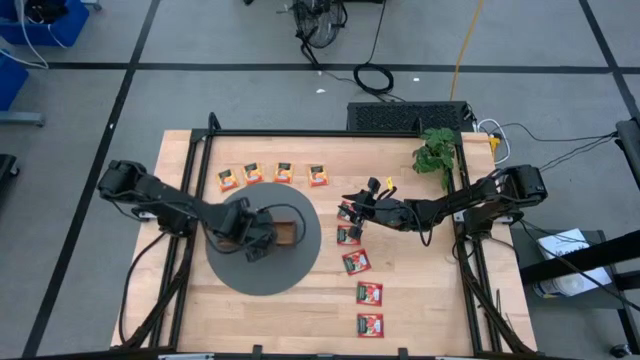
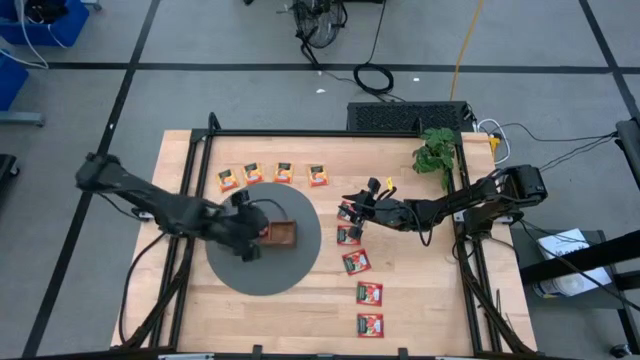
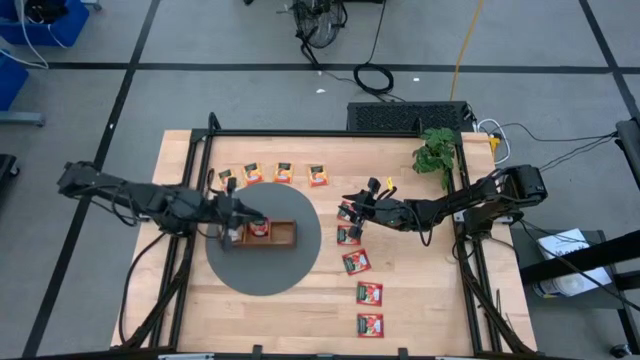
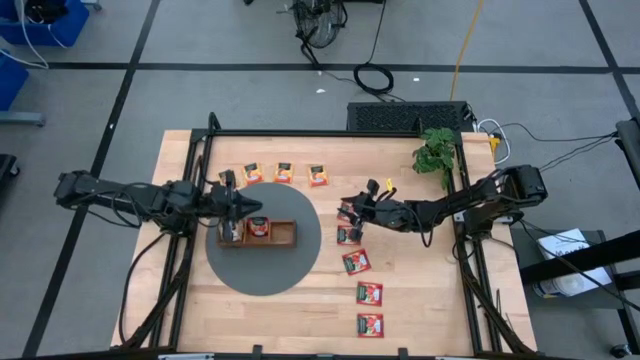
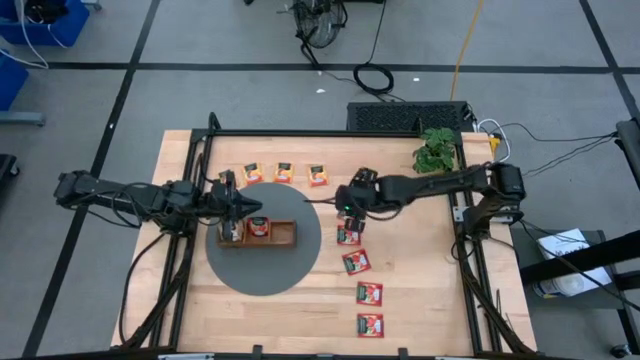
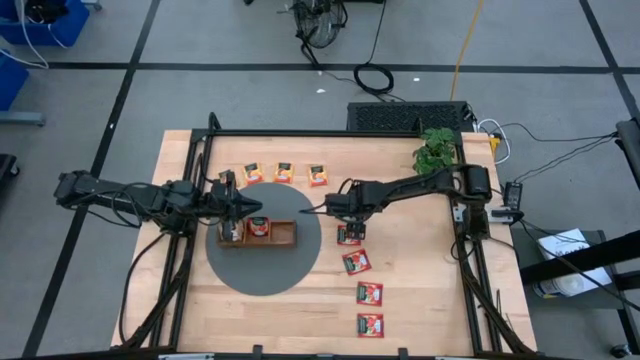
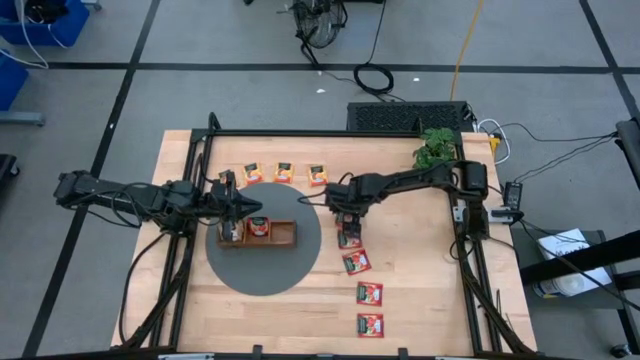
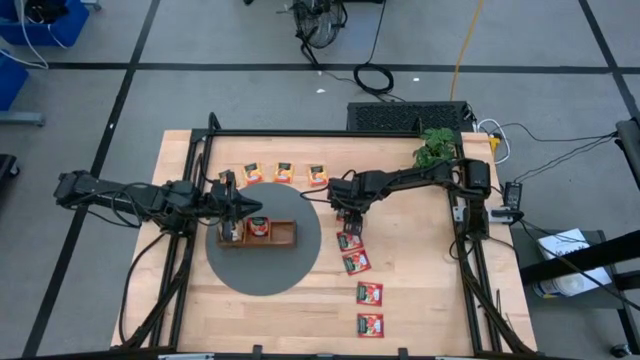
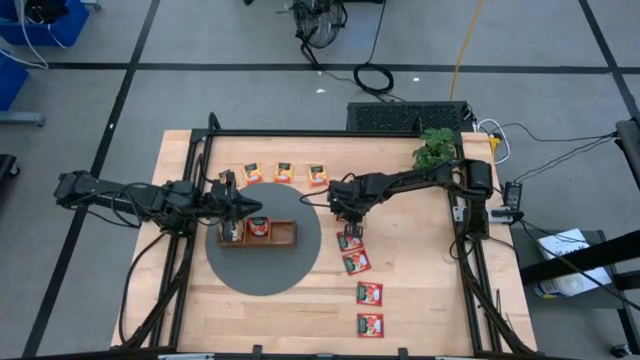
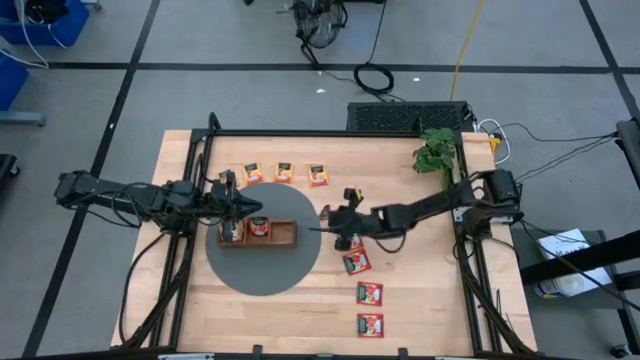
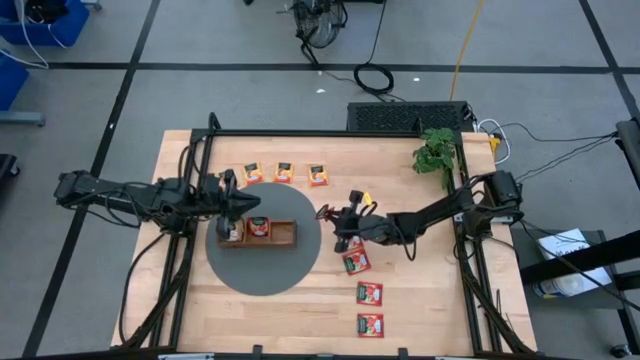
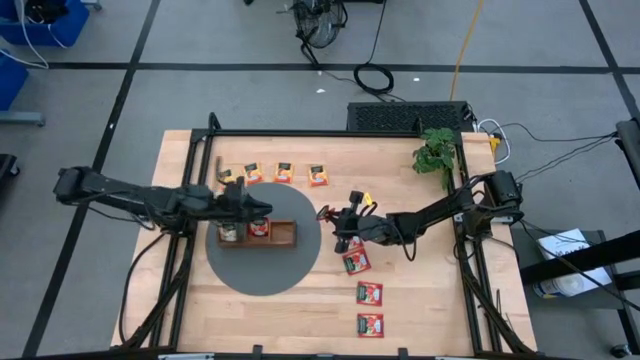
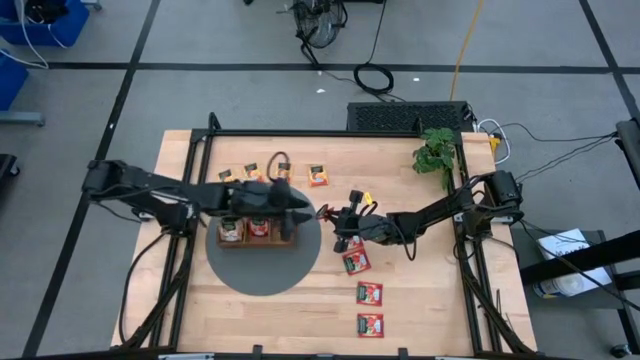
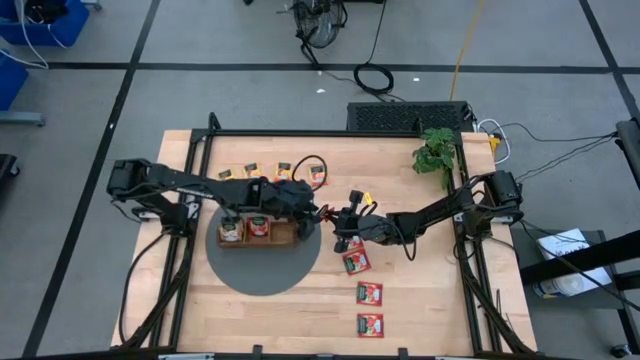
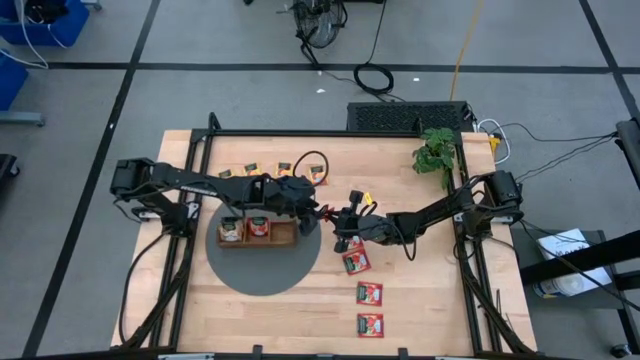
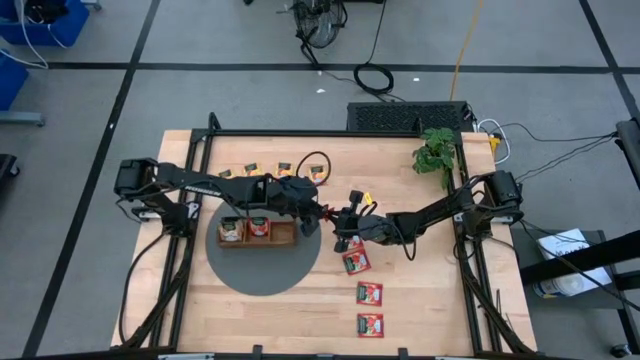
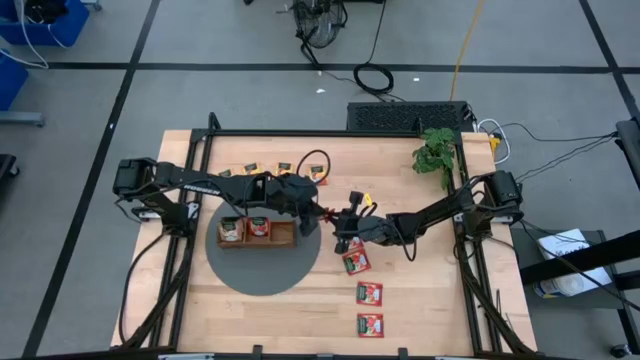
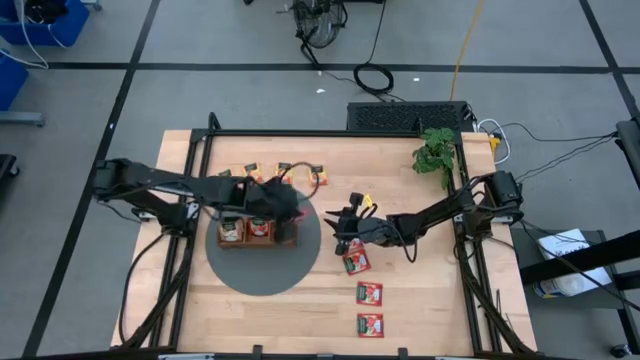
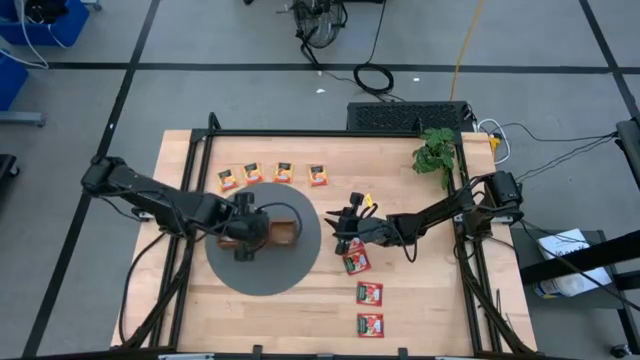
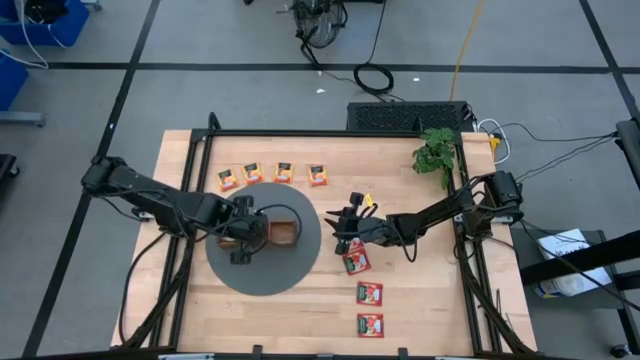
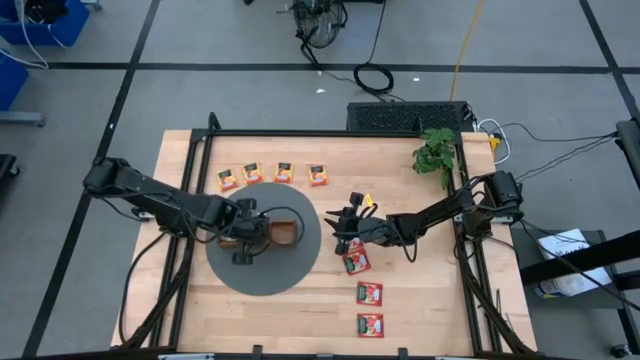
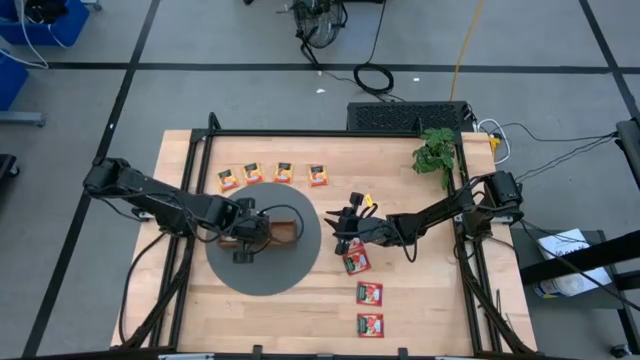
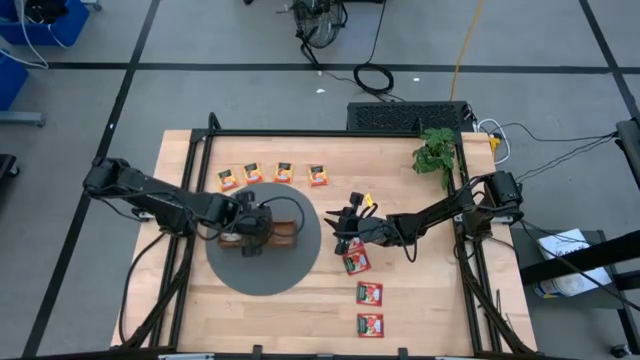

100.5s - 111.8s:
Task: Pick & Place Tea
Put the red tea bag into the middle section of the wooden organizer

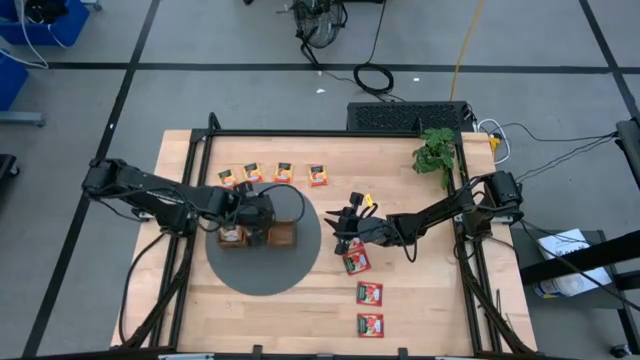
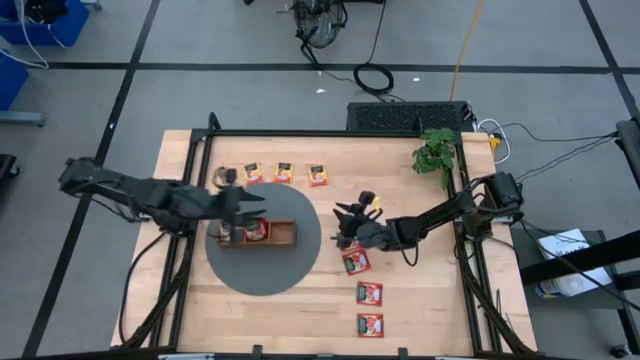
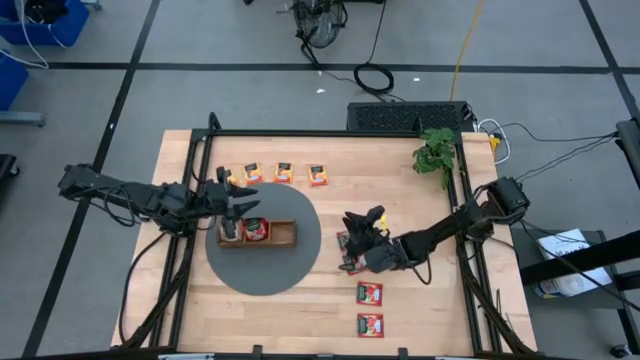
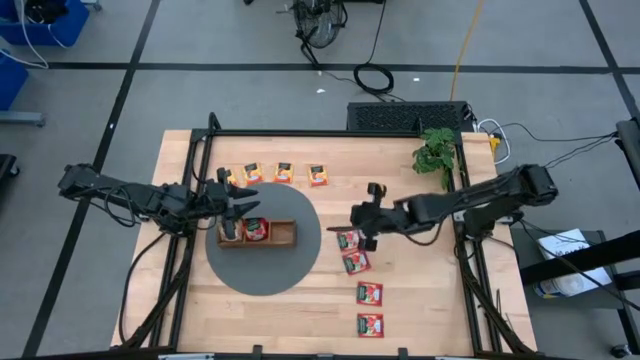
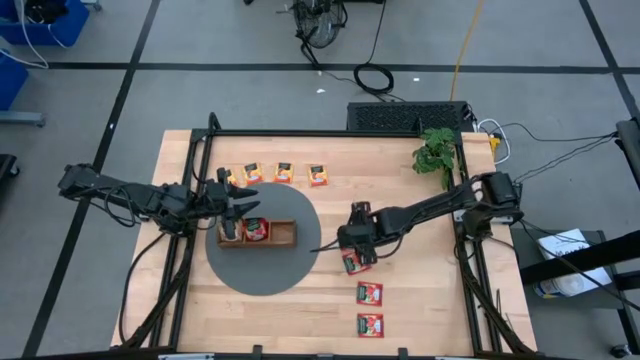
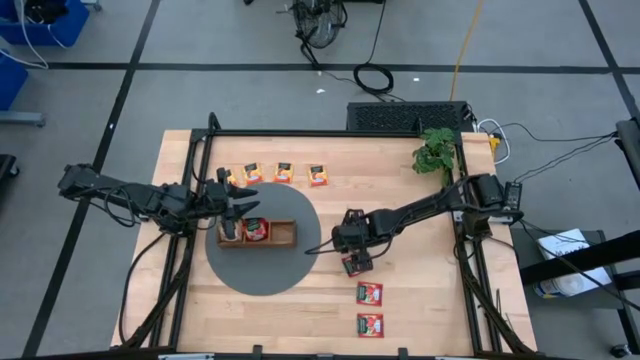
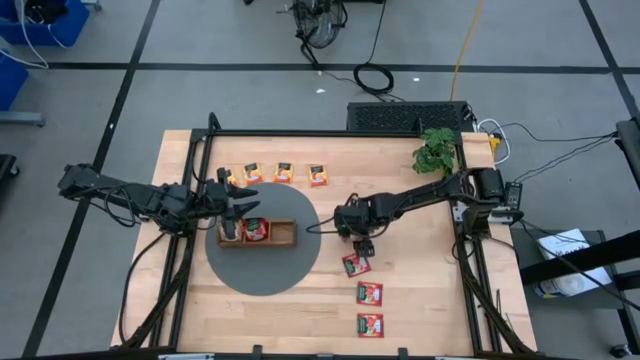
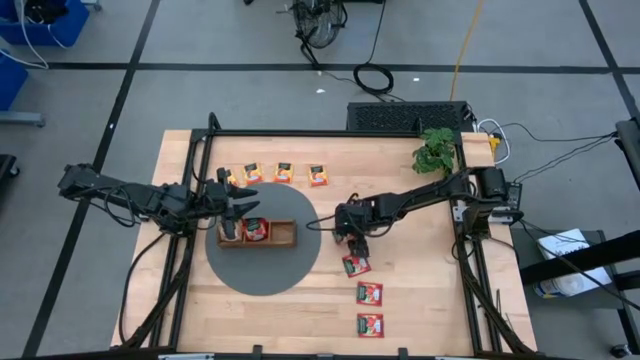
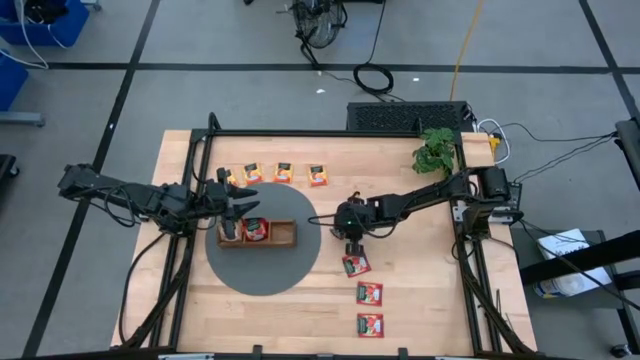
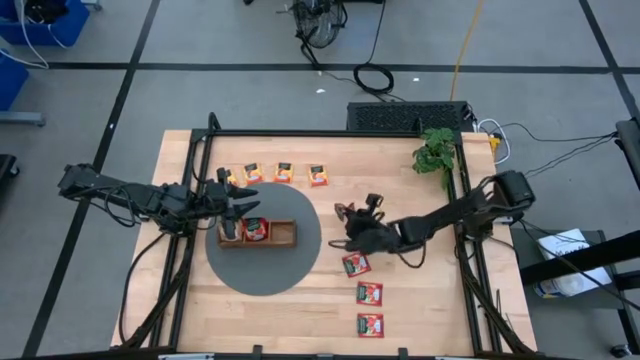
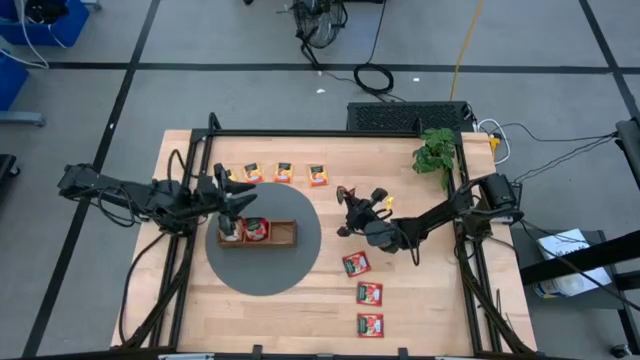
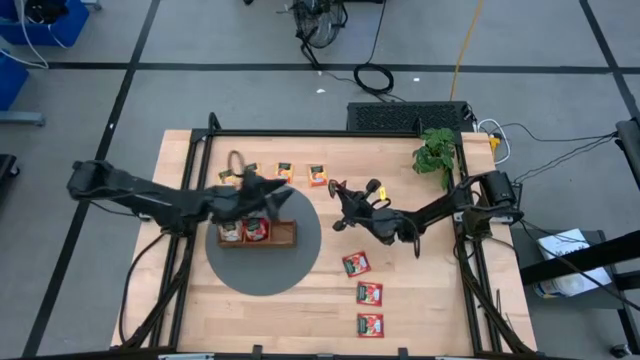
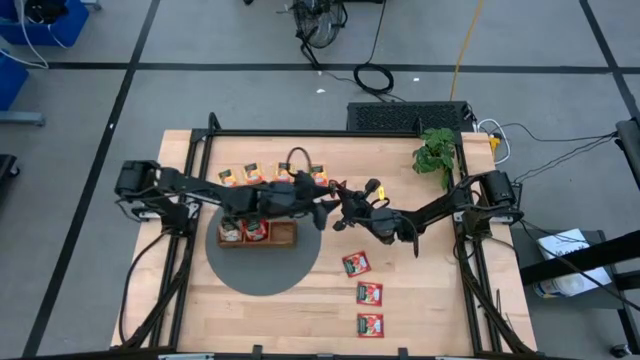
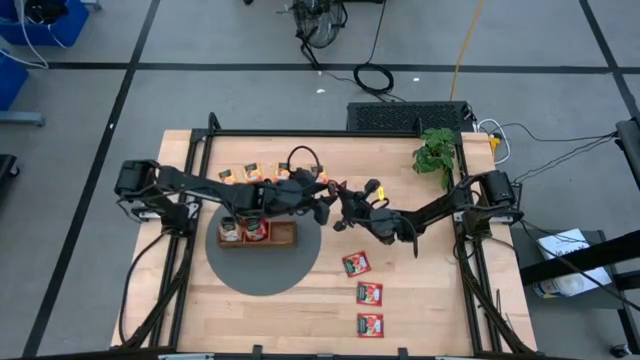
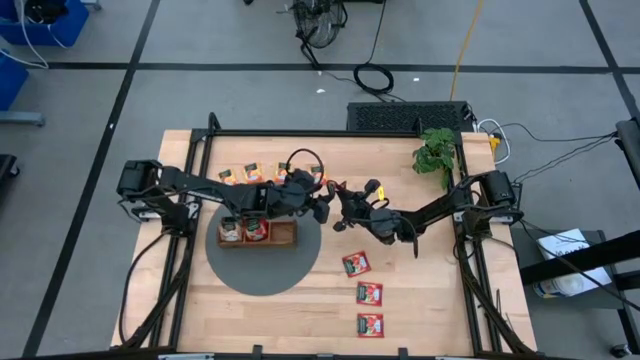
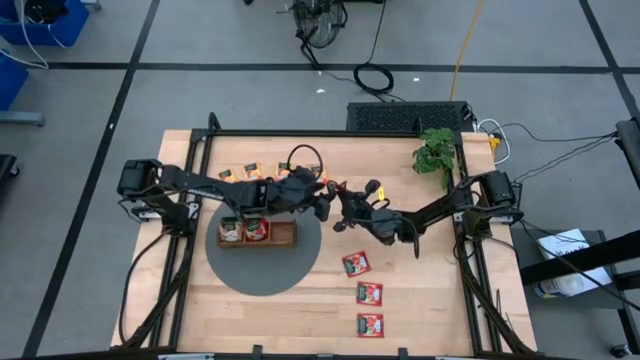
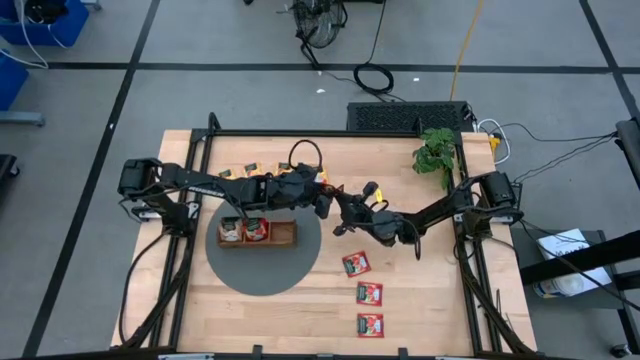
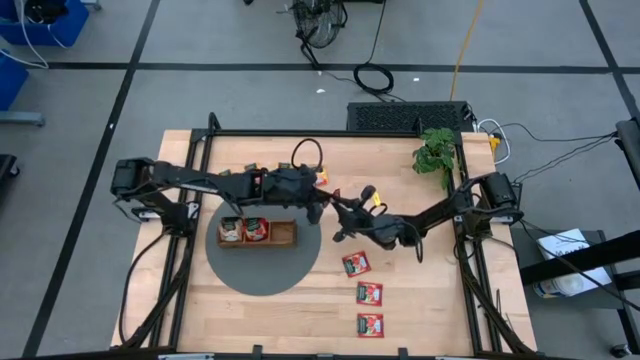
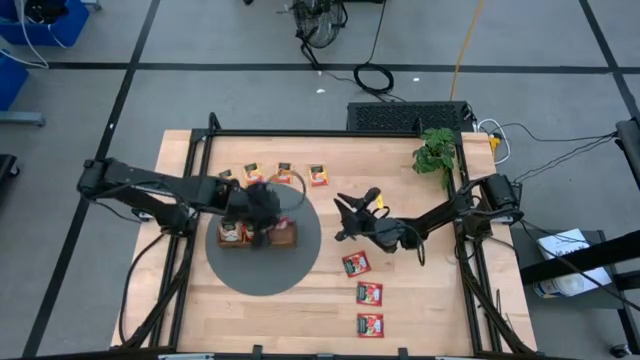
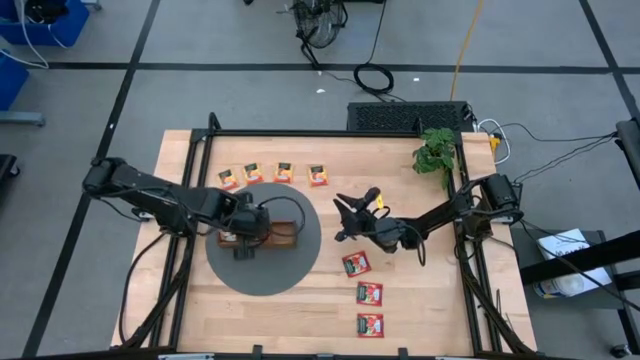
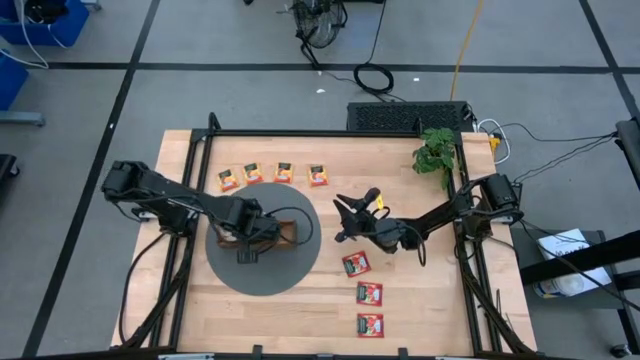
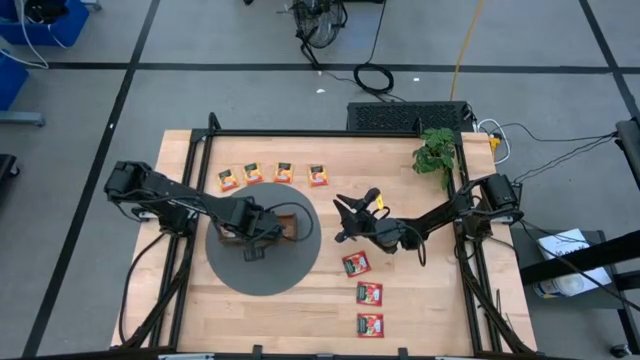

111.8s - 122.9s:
Put the red tea bag into the middle section of the wooden organizer
